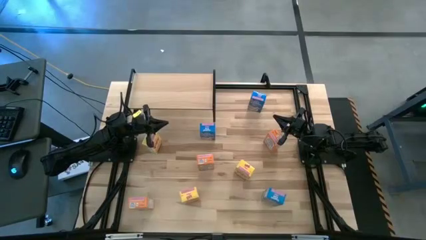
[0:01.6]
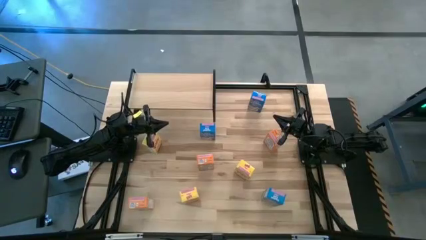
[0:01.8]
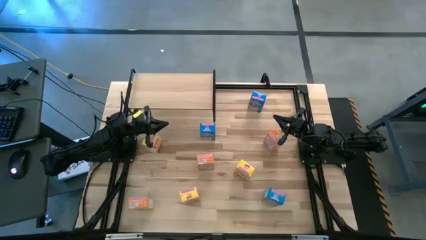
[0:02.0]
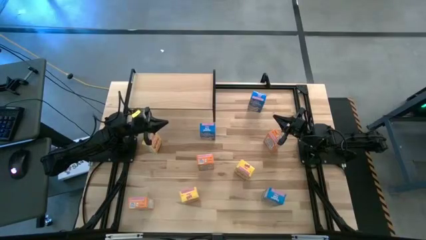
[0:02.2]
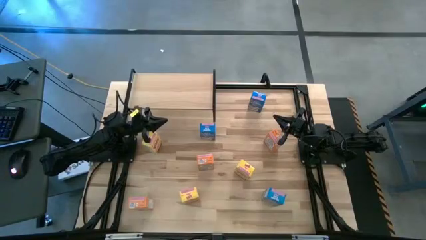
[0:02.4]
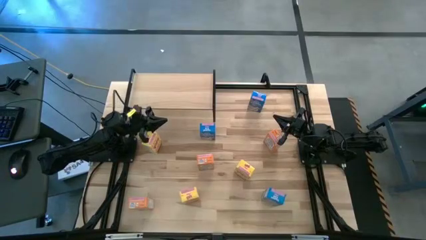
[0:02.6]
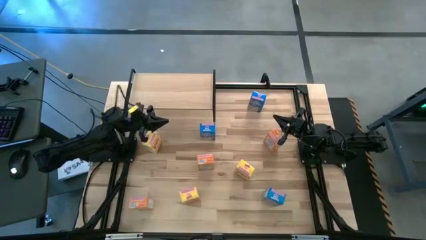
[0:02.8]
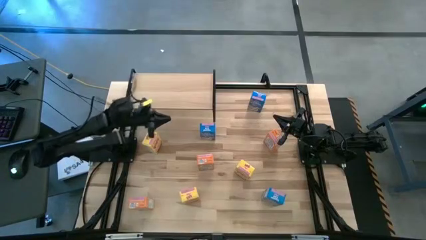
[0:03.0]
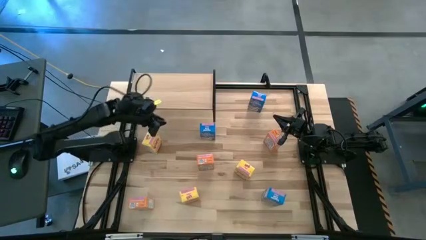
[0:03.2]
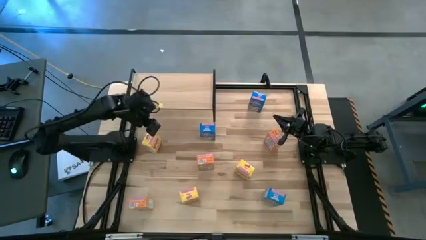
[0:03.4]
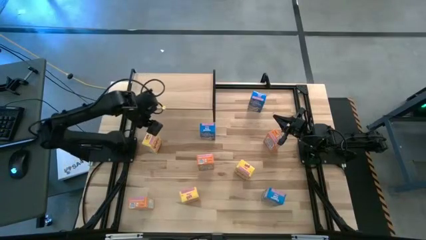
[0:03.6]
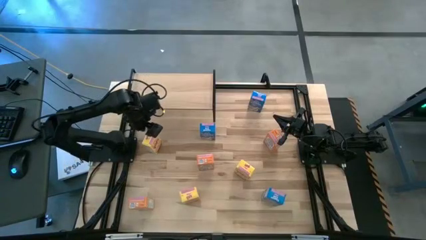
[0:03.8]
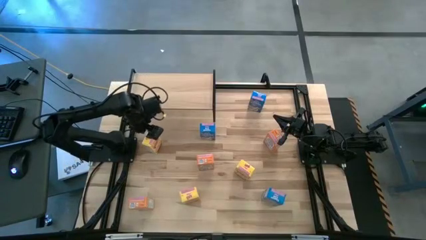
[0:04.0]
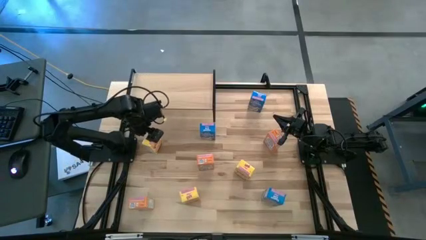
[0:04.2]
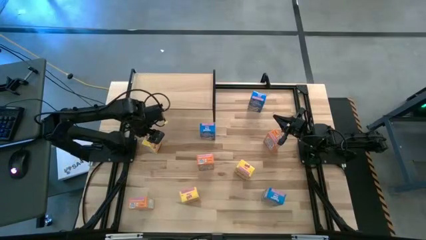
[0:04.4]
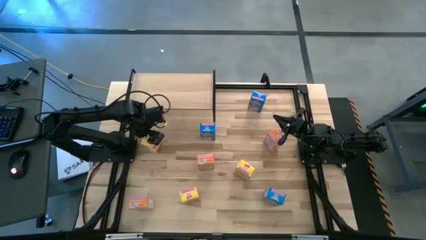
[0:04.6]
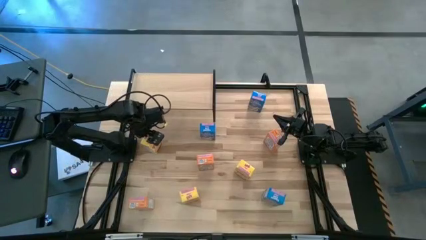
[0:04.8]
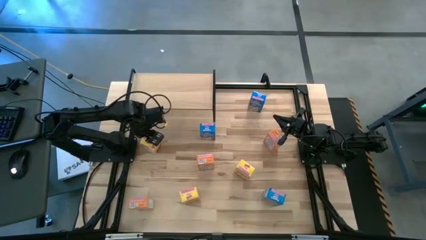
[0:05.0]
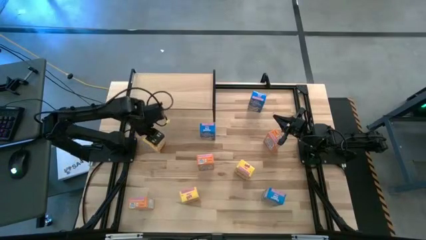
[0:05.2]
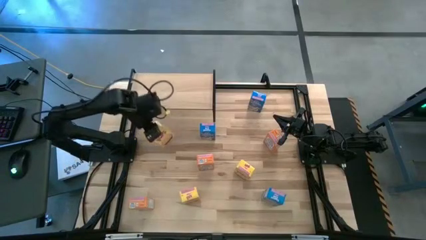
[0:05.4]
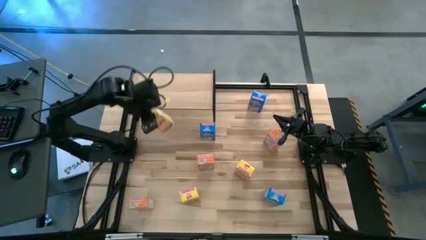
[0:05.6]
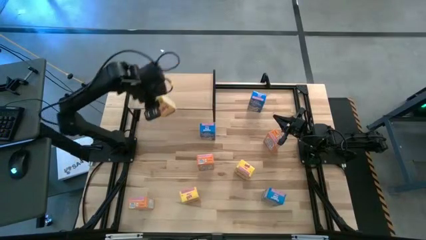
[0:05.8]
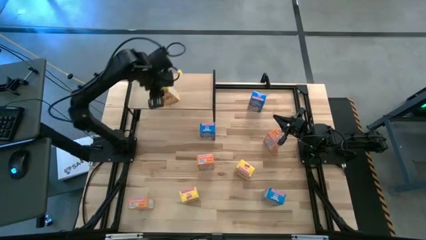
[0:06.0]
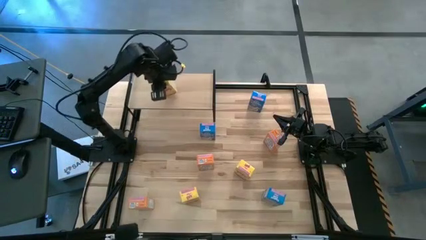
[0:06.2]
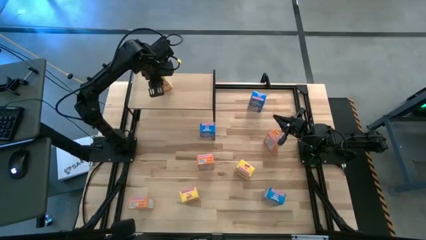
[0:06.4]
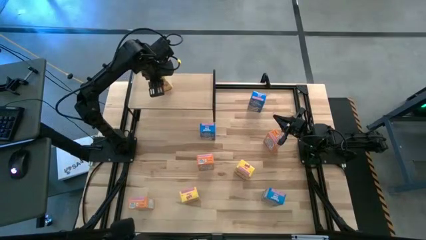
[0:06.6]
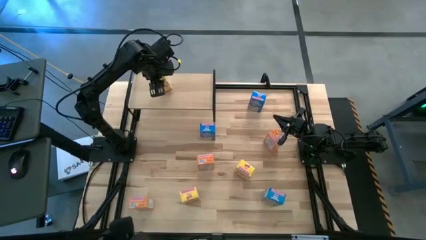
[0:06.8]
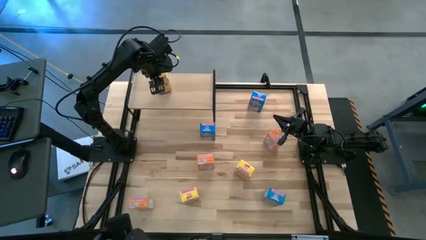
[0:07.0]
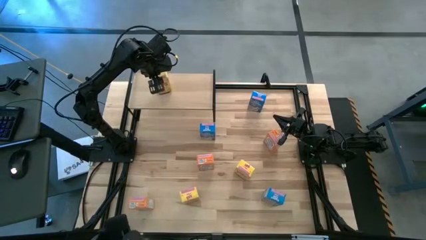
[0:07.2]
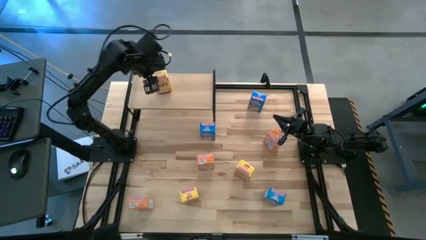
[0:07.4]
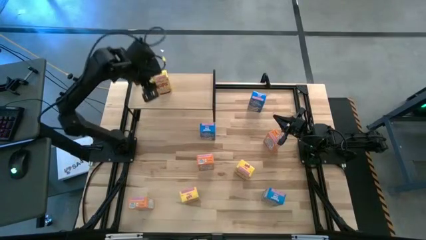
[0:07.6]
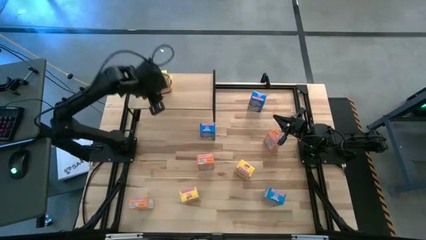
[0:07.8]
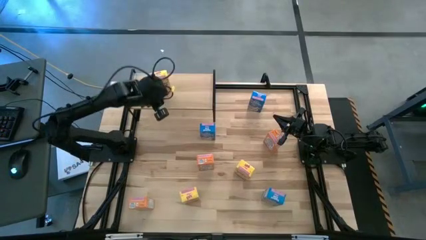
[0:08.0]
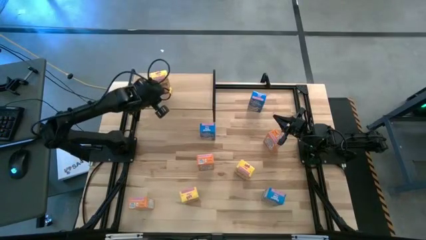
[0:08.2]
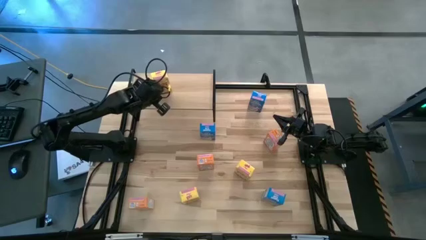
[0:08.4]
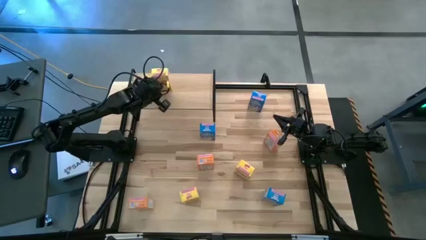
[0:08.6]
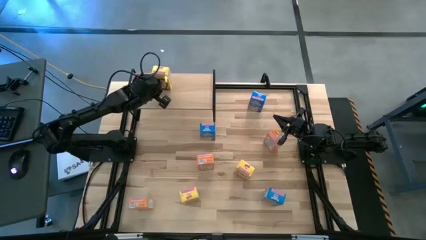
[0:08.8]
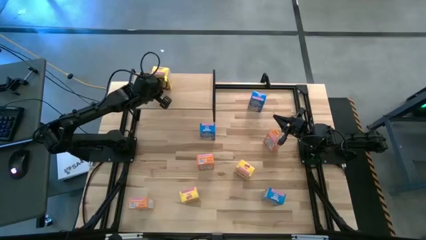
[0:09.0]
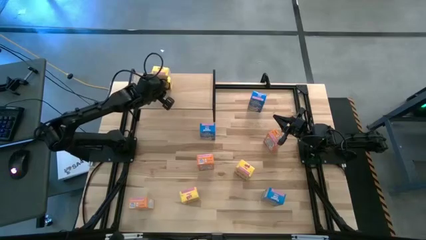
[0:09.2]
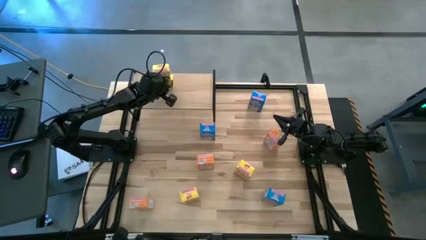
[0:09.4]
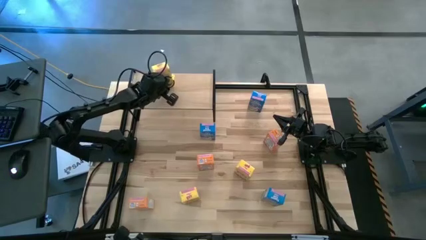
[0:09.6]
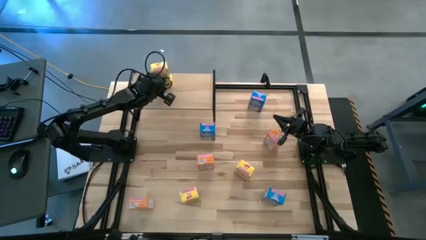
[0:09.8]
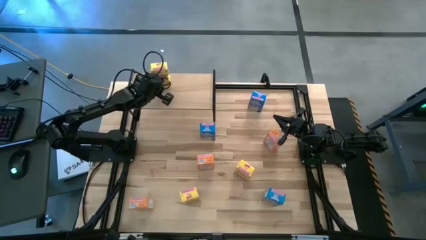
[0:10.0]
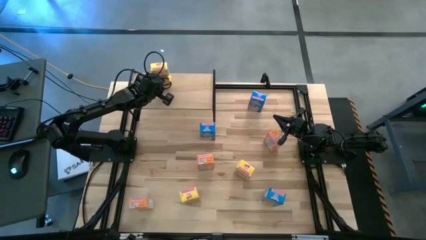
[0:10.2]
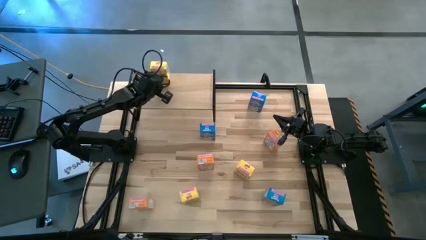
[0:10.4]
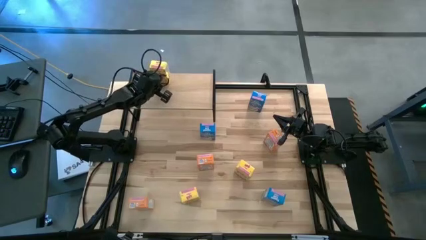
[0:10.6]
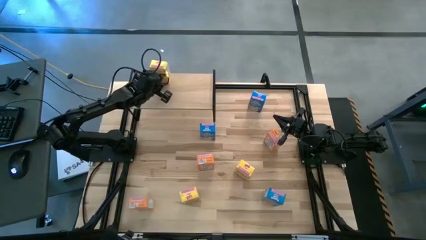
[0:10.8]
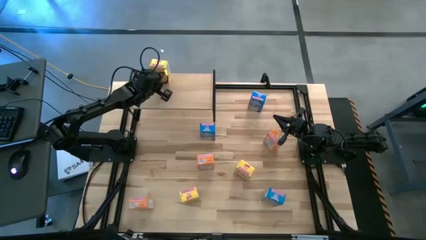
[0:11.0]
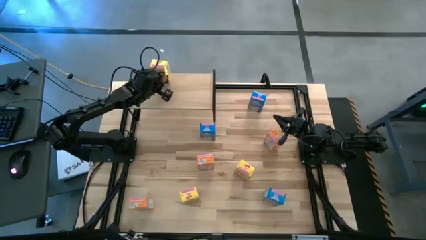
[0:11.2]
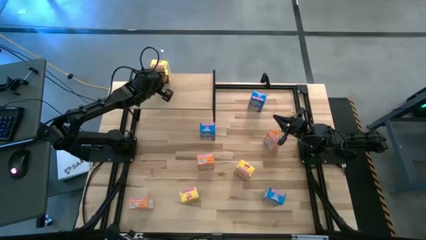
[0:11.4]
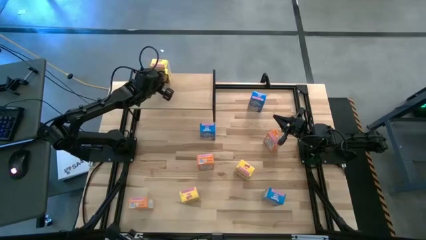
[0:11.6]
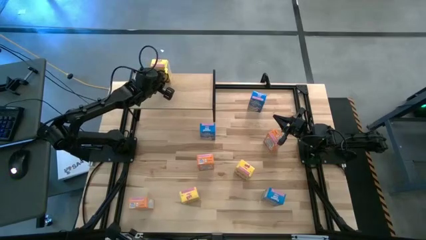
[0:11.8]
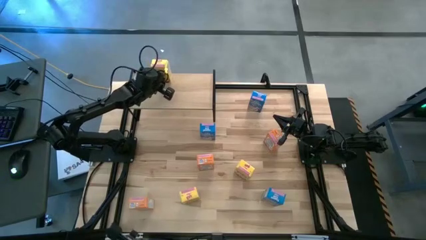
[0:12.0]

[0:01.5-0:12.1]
Task: Stack cereal on shelf
Put the top left yellow cereal box on the shelf
